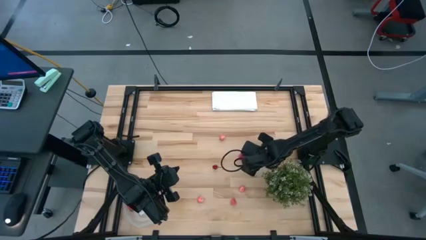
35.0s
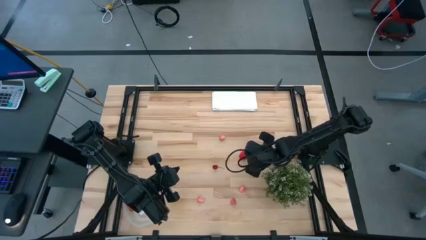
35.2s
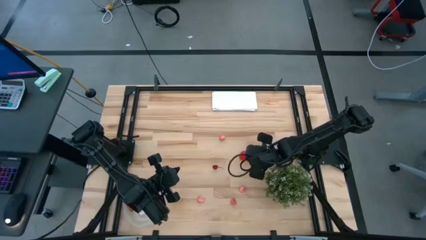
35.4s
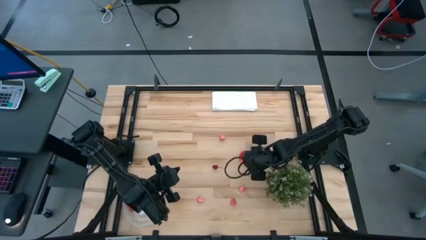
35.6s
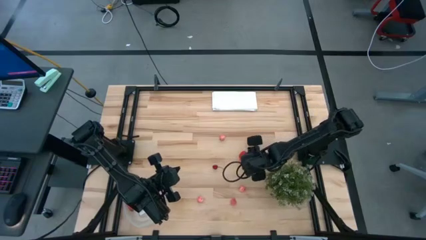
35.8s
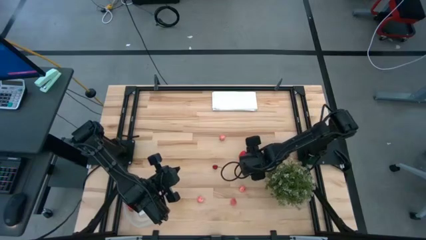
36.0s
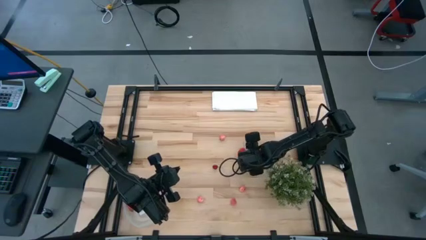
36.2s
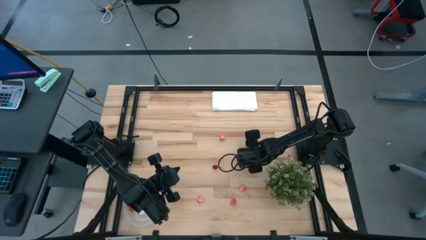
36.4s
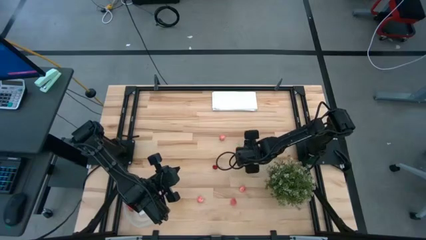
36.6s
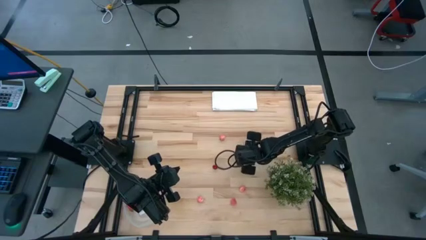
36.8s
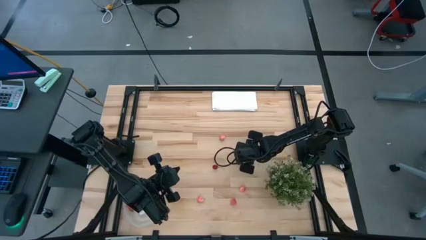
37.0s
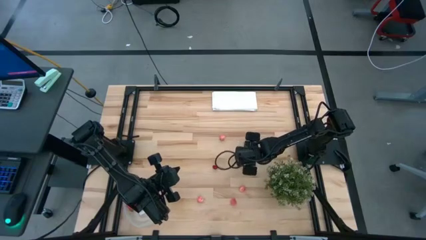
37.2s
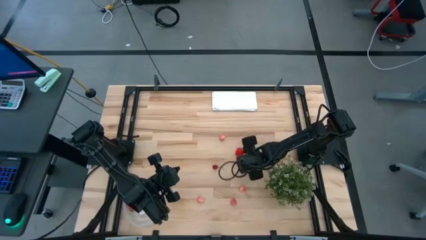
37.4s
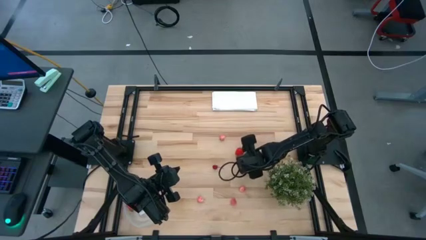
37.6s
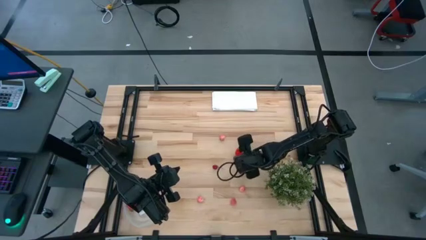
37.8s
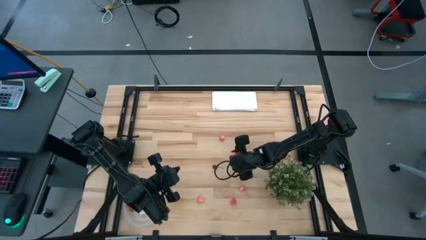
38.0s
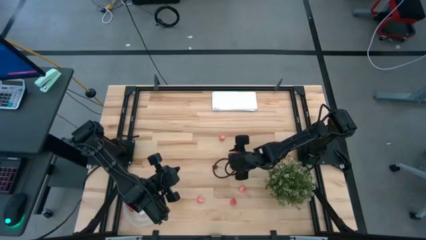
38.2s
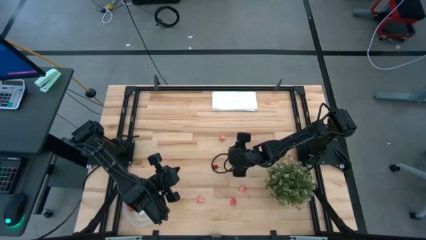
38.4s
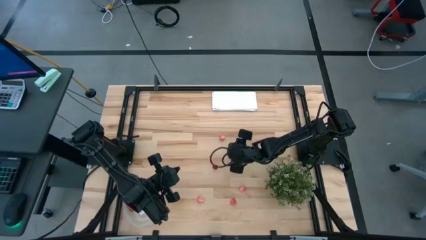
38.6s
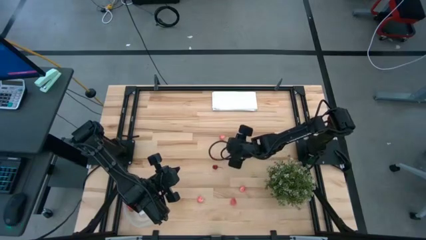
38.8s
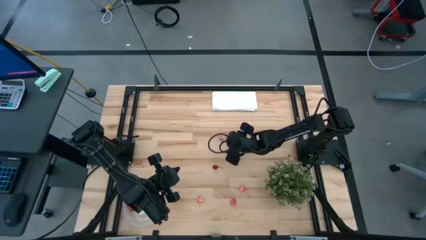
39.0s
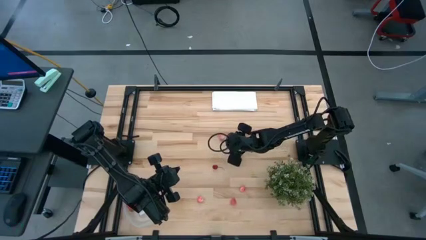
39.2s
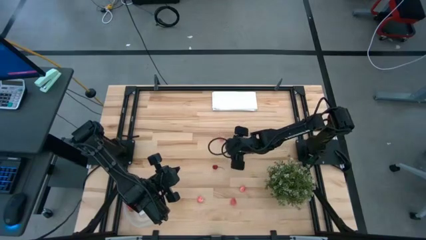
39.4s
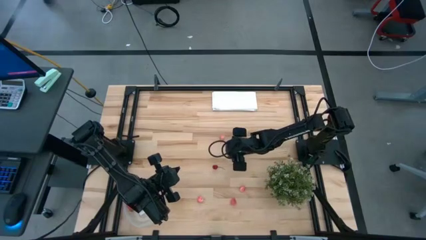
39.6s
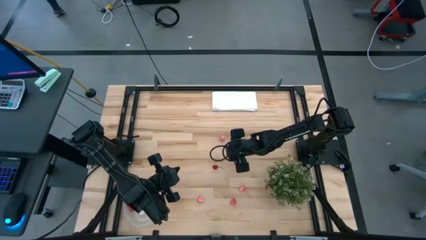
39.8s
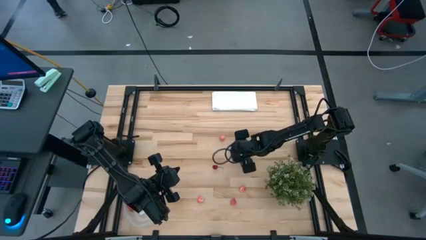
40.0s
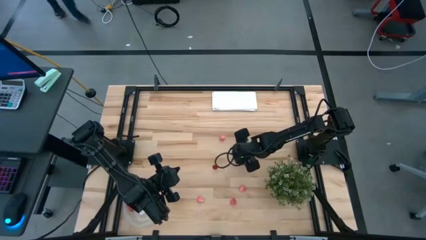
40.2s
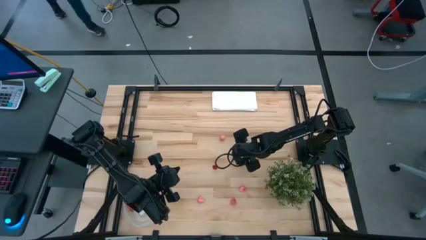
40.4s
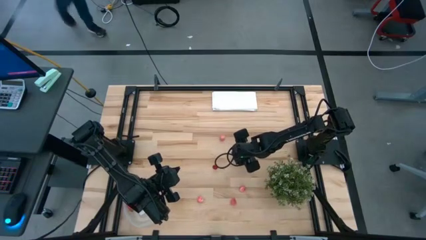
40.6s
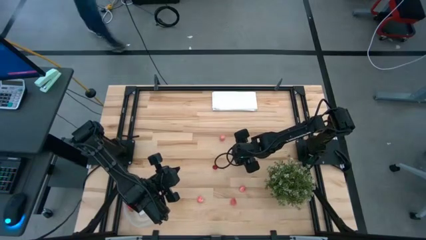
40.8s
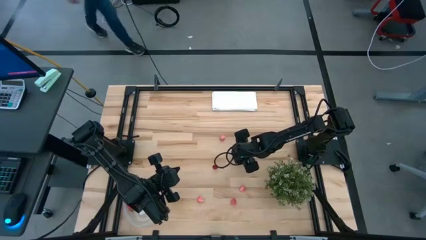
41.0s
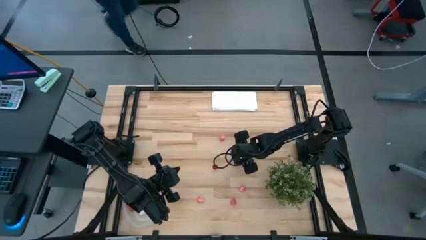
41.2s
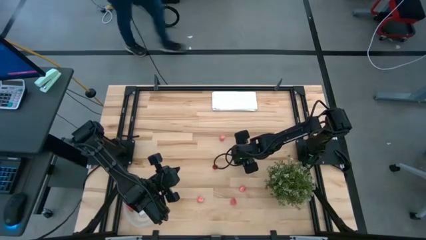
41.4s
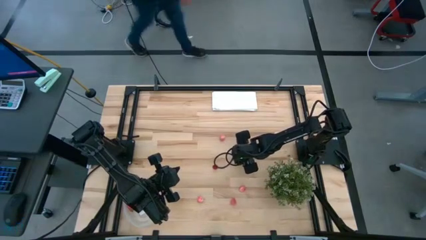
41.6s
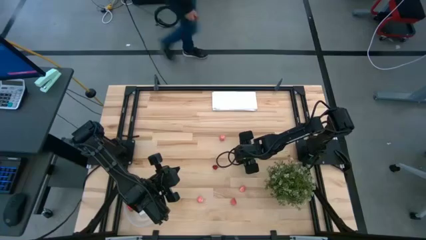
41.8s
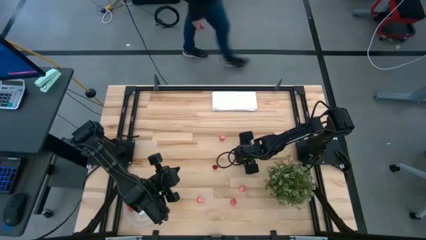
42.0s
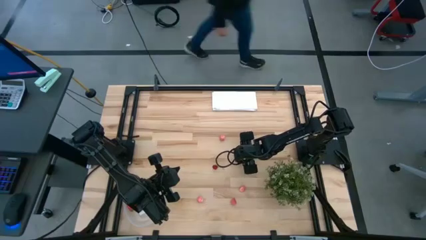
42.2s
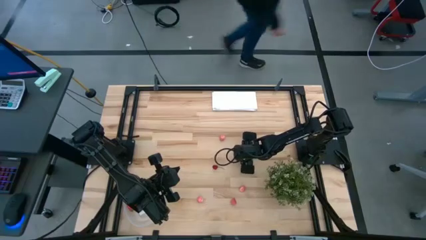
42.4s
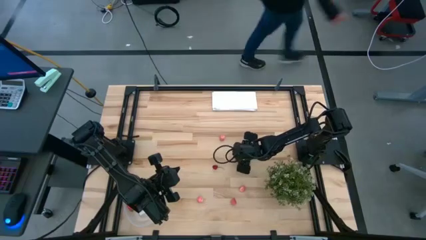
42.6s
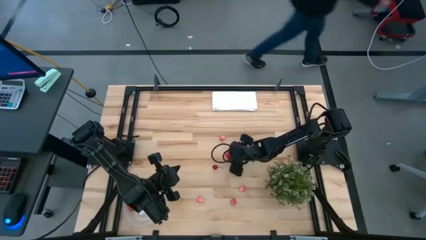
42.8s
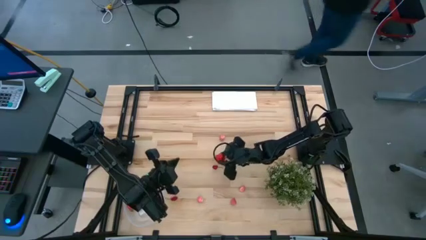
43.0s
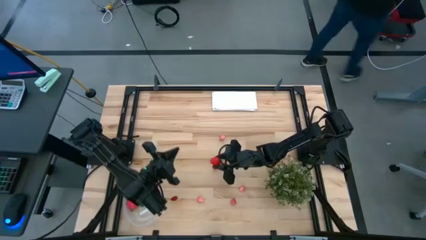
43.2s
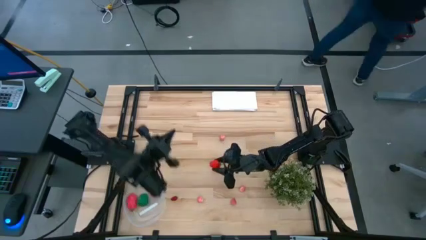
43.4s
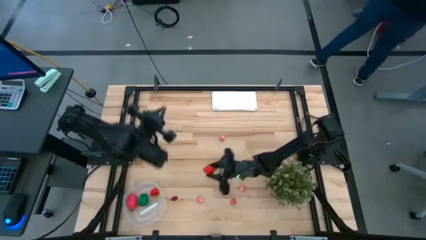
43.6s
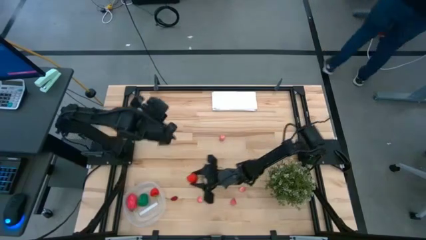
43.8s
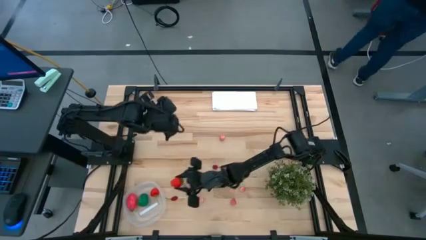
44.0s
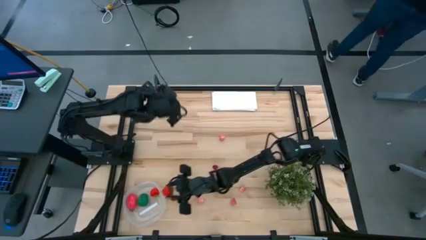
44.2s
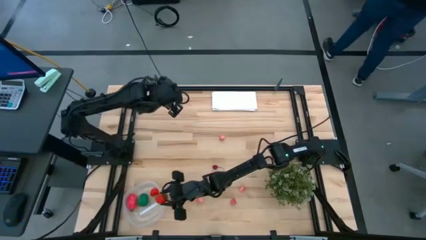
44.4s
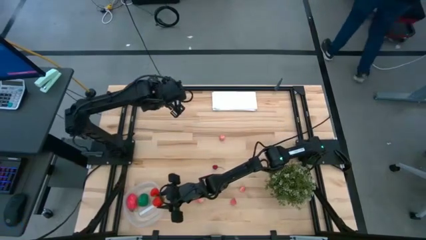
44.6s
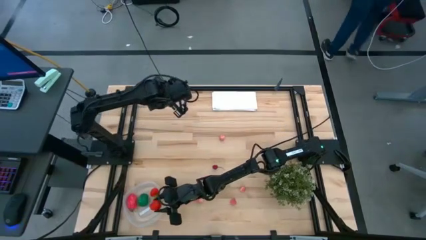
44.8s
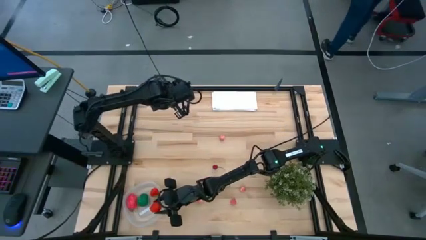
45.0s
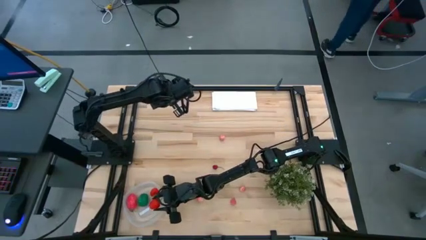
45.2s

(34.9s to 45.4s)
Task: Pick and placing Produce into tupperware
Put the strawberry into the transparent plastic container

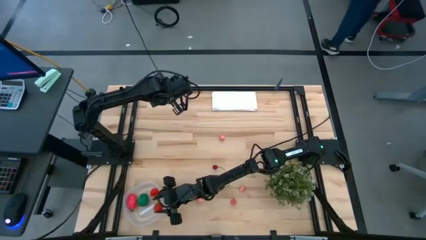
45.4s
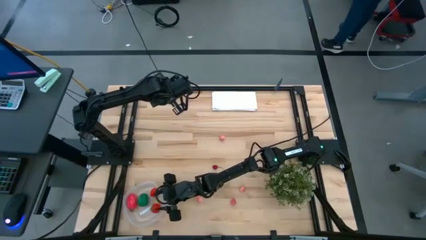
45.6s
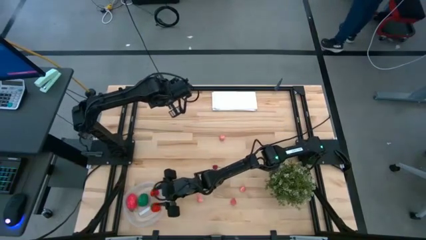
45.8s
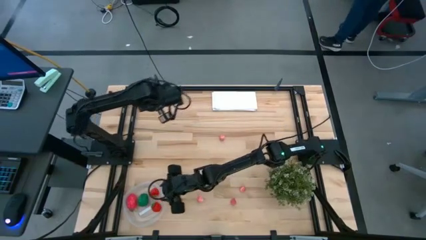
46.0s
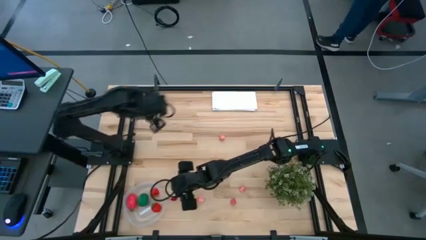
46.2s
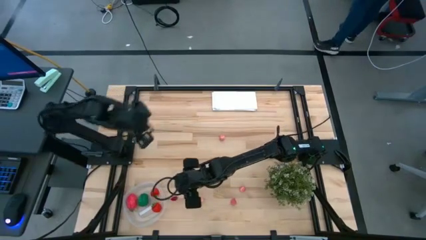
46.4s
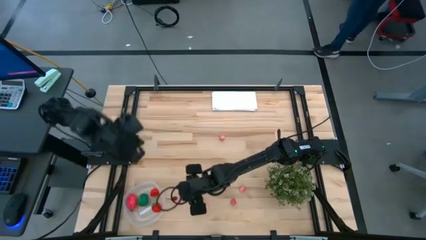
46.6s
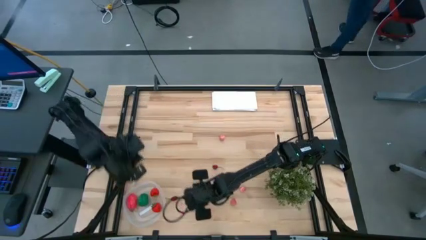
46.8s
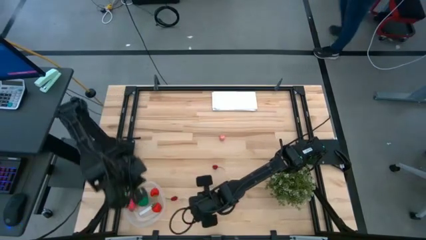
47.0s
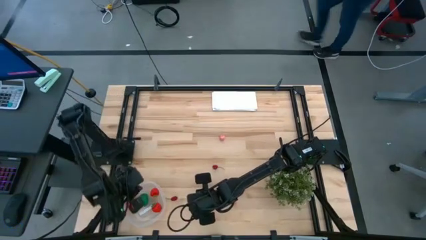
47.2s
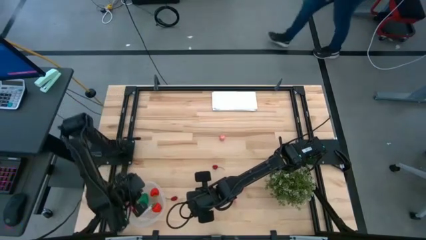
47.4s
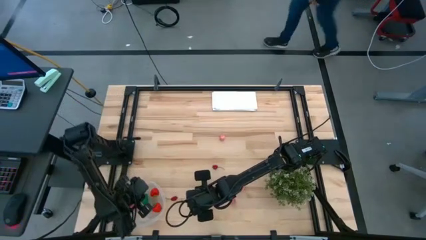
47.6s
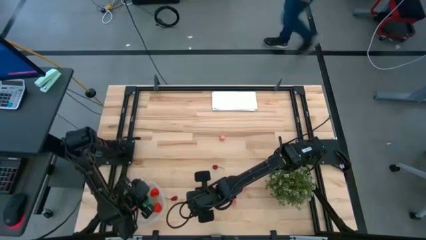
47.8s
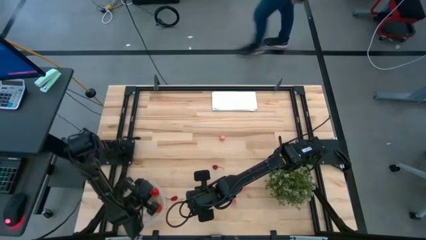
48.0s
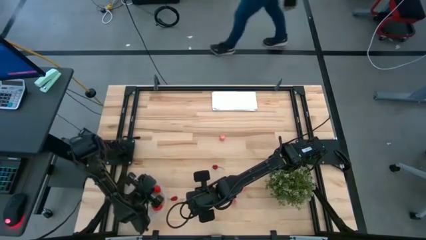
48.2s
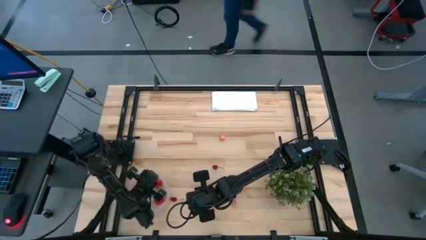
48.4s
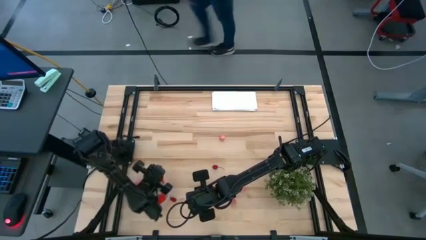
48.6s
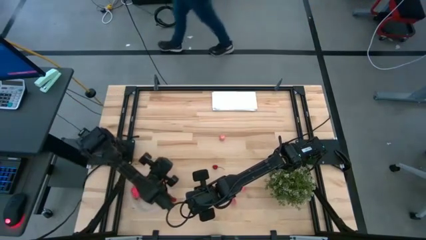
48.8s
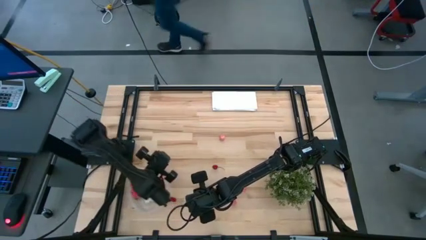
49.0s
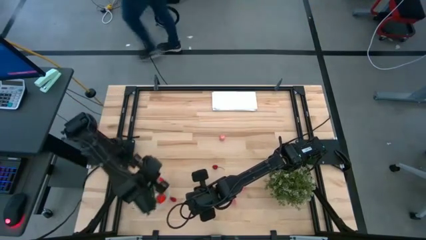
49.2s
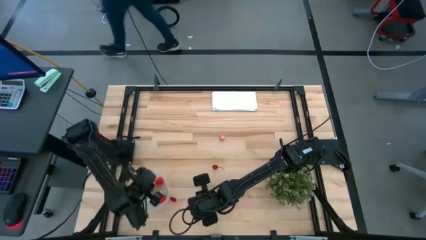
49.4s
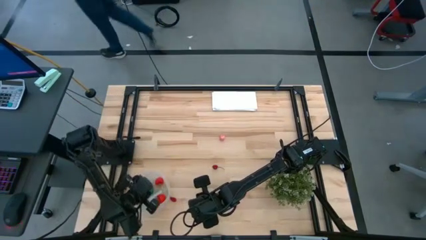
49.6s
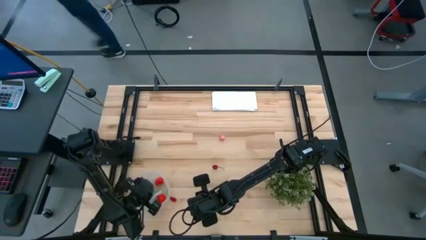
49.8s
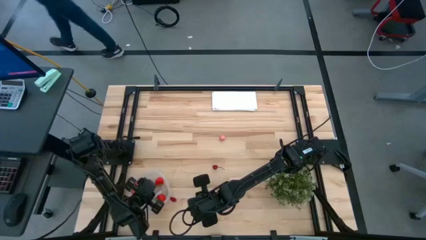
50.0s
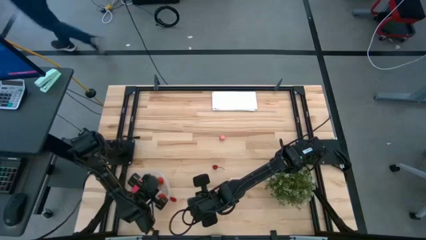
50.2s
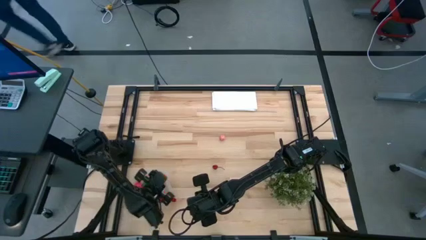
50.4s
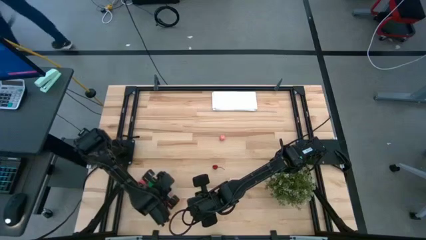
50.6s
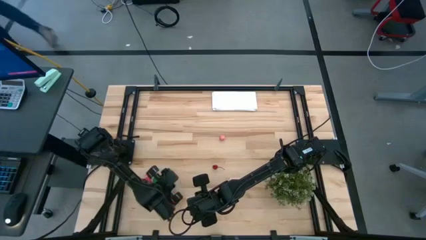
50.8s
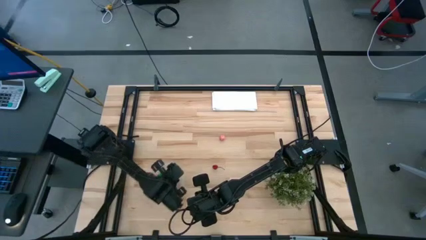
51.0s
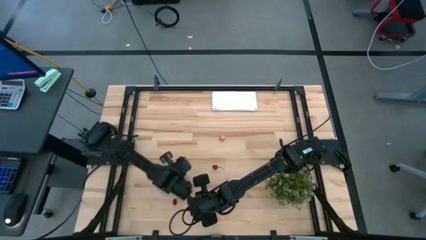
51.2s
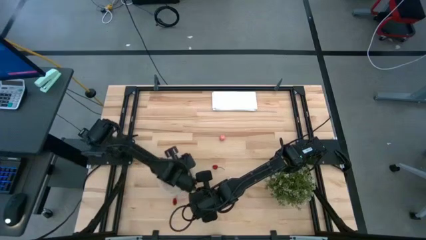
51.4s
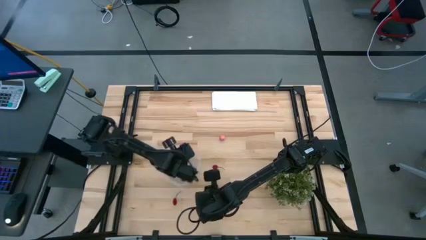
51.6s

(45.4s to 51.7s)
Move the transparent plastic container to the center of the table
